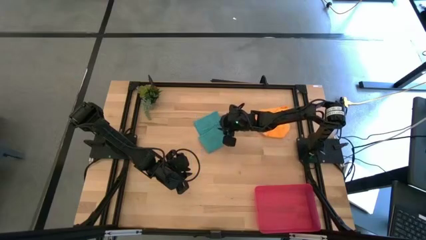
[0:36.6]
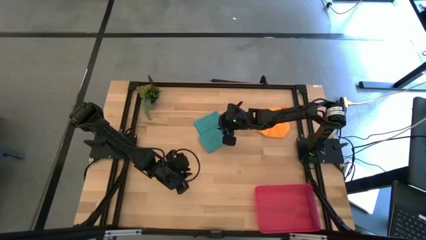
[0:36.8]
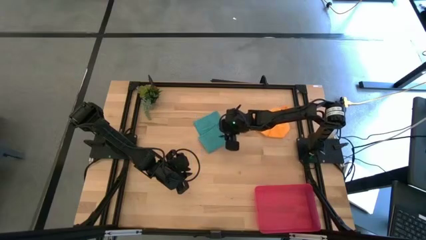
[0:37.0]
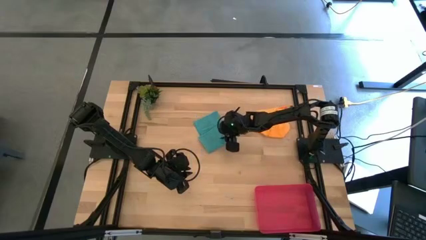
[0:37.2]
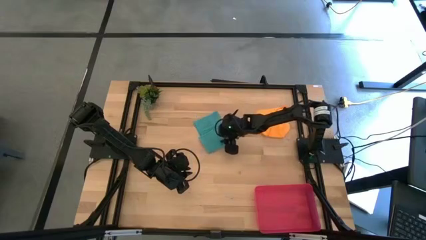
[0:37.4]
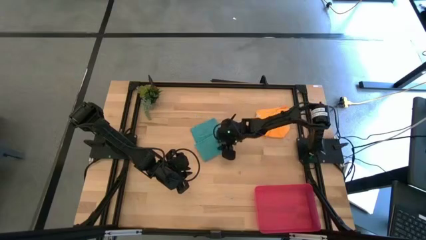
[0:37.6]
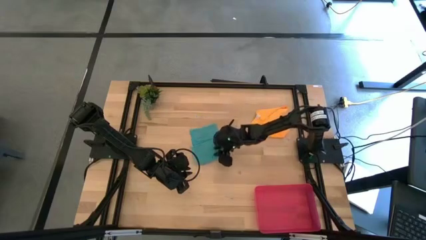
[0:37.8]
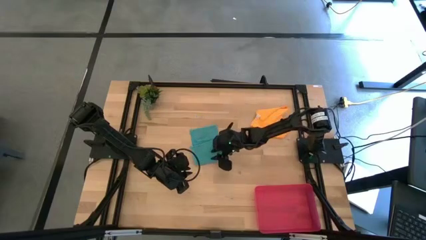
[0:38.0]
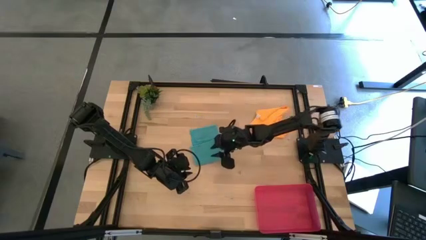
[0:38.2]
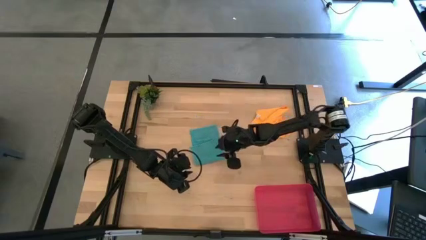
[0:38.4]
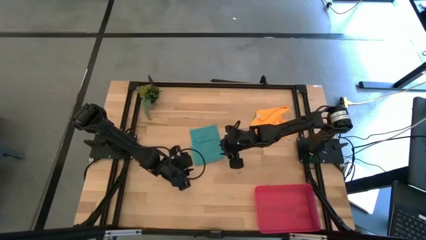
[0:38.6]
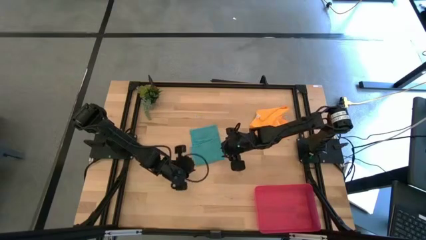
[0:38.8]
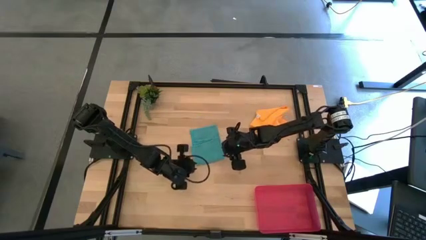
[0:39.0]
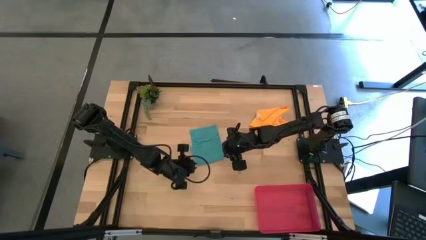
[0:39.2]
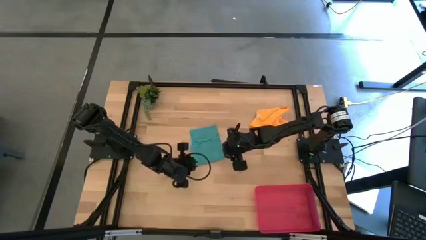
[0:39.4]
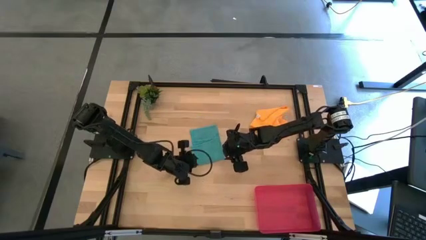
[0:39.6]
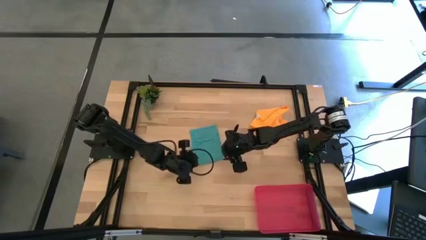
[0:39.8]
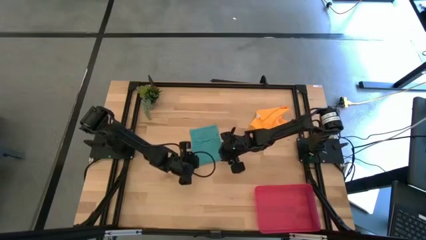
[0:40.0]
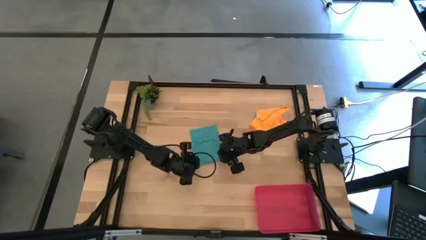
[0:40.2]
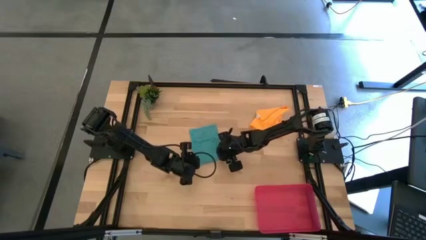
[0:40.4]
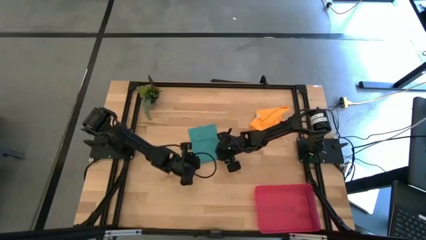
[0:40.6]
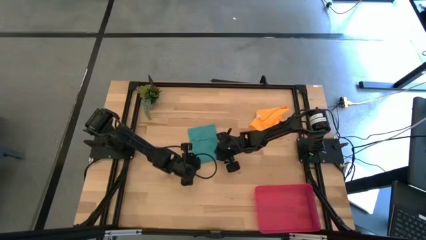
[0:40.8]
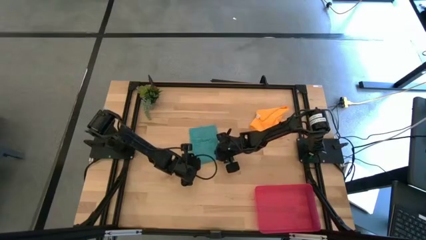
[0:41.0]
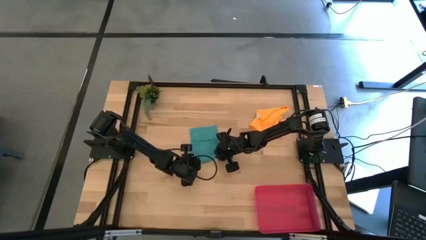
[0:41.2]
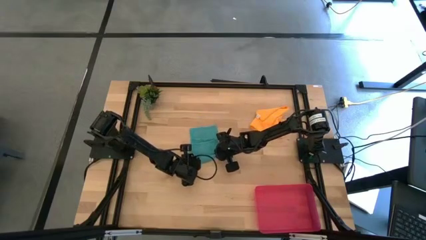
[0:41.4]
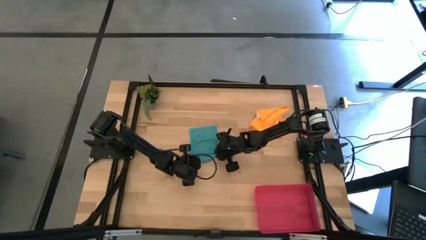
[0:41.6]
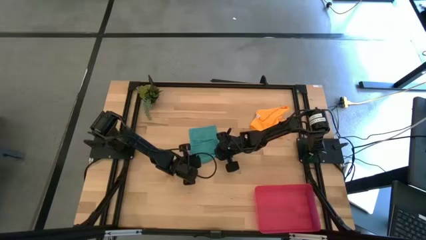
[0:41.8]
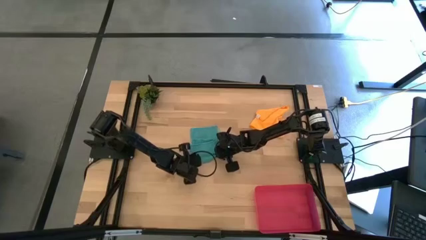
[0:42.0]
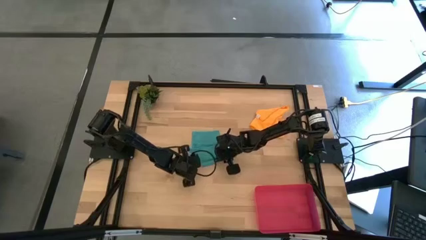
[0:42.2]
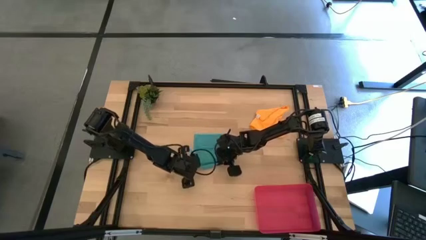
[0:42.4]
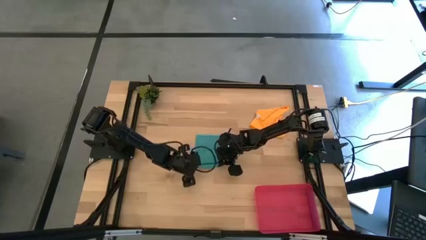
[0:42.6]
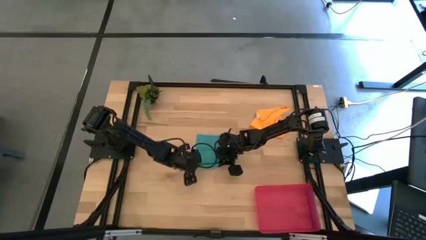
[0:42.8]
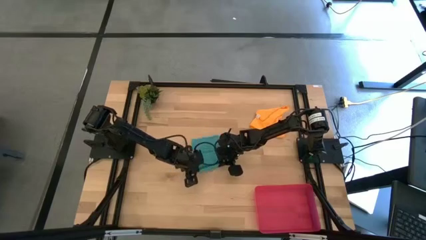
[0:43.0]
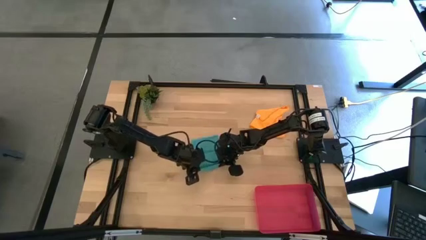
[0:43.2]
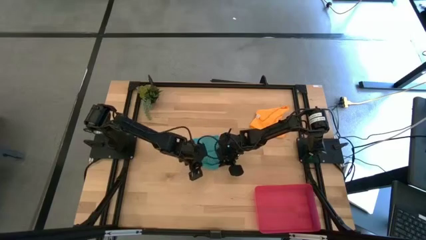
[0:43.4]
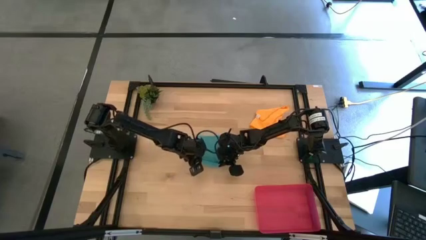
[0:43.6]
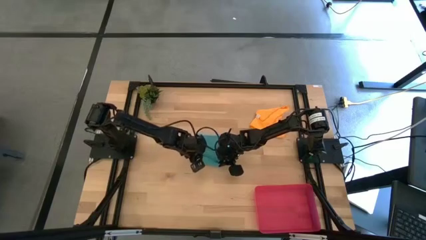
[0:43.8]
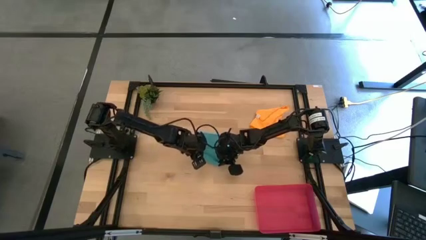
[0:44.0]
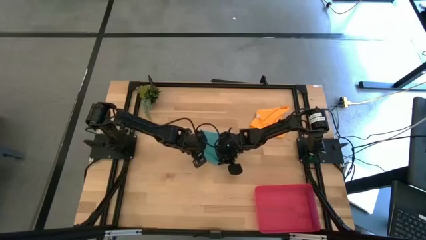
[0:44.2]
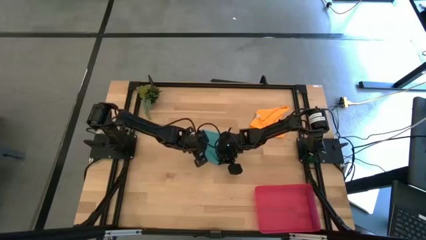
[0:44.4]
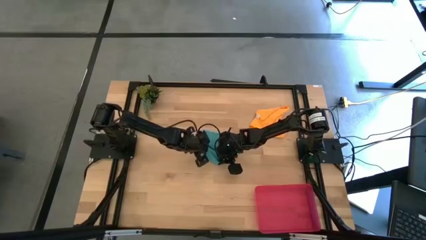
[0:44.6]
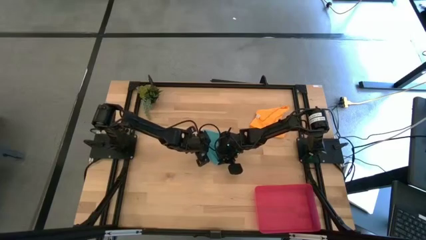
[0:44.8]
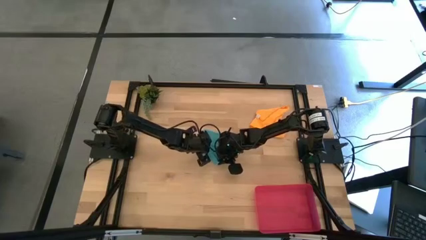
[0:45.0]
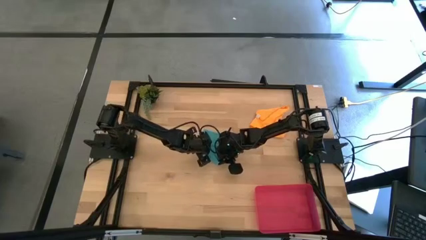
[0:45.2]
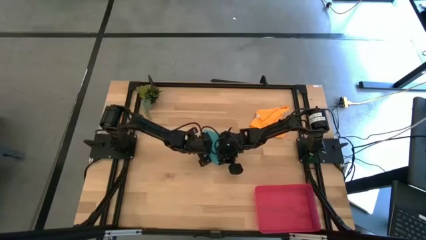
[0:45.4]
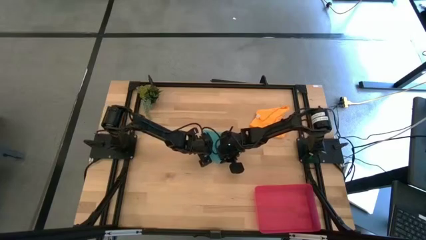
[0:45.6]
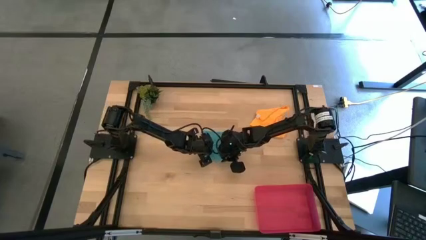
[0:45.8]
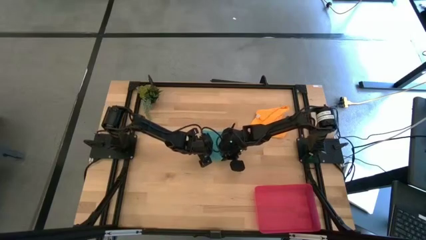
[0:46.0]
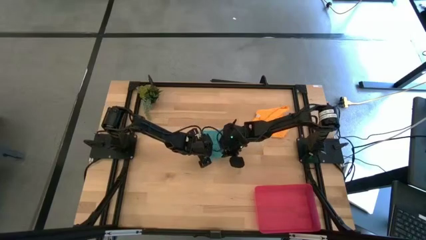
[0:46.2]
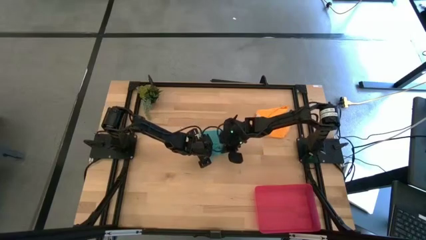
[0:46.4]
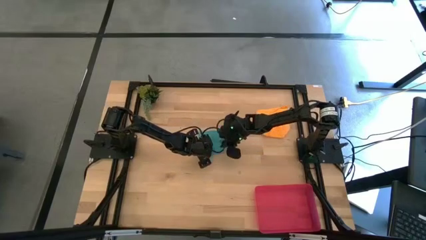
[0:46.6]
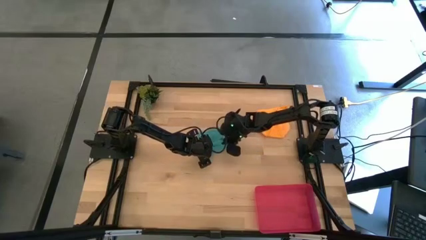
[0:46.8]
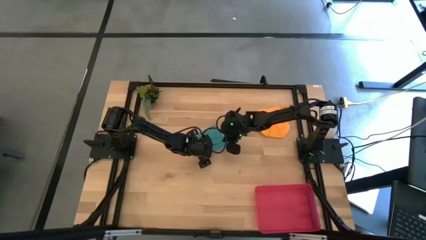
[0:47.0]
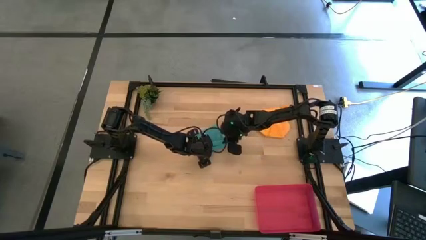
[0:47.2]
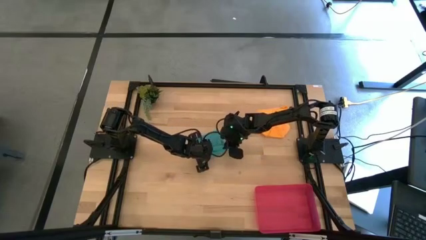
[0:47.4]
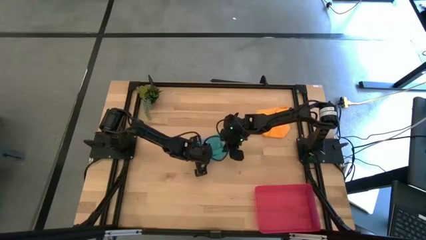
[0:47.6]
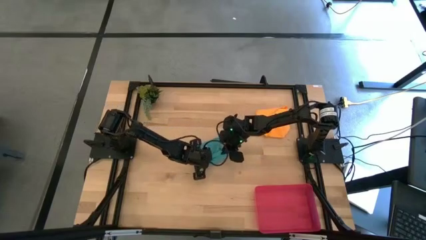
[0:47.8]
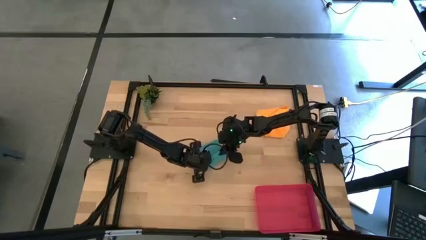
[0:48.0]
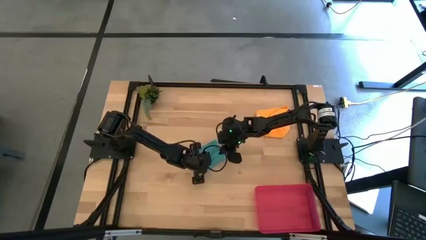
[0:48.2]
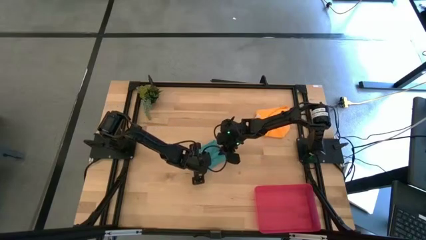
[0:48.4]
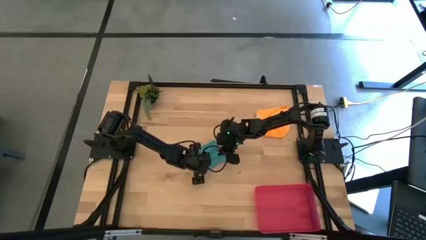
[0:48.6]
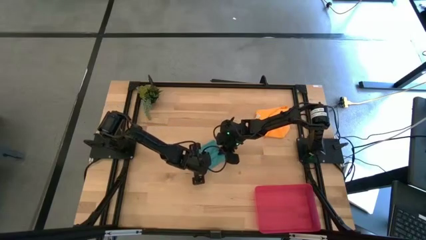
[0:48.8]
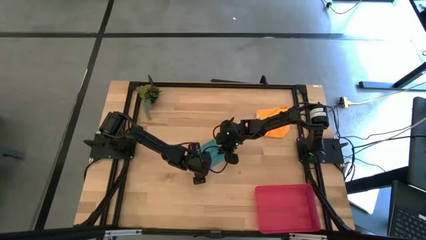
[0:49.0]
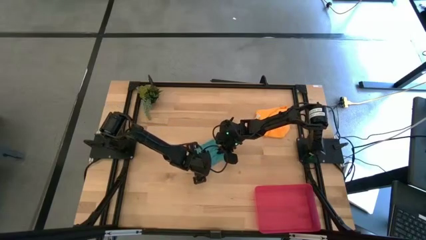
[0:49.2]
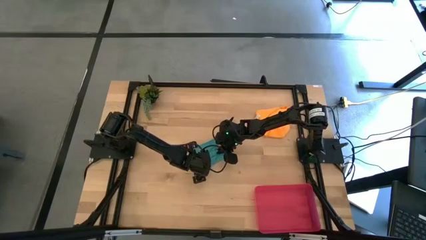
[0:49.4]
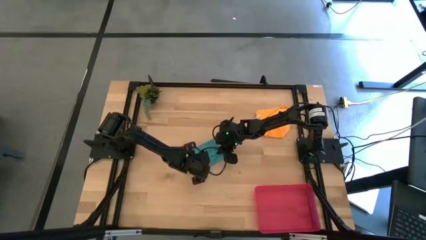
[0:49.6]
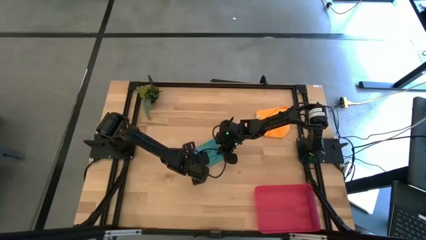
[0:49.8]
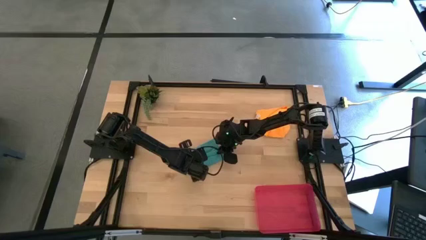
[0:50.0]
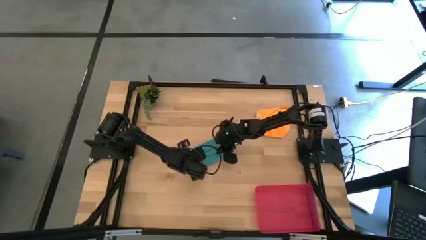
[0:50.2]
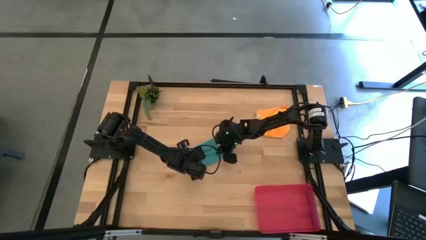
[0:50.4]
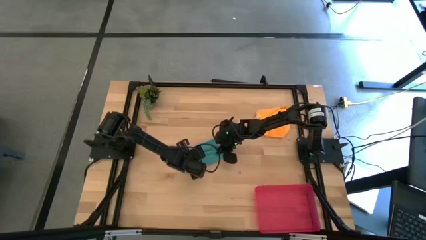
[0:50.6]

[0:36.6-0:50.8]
Task: Roll microfiber towels into tight, uniform cylinder then place into a basket
Roll the blue microfiber cloth
